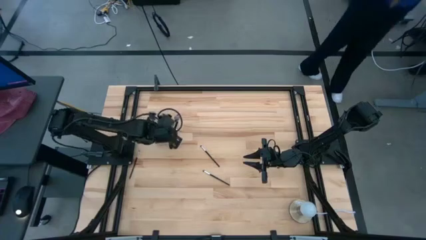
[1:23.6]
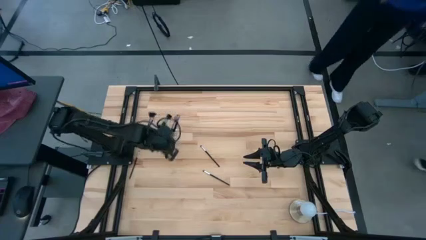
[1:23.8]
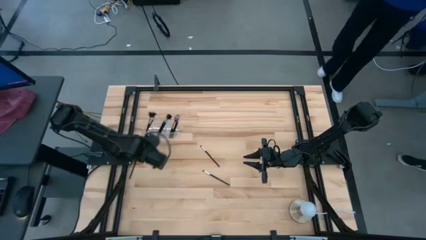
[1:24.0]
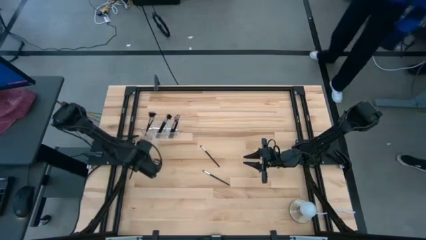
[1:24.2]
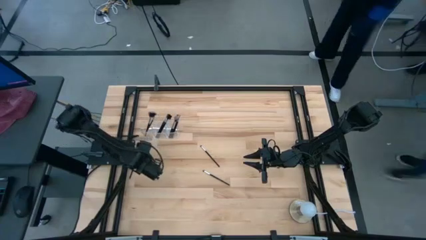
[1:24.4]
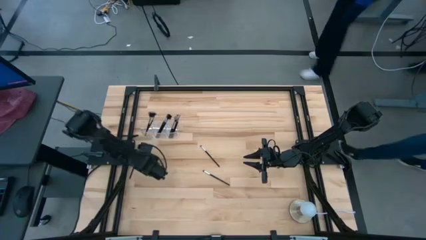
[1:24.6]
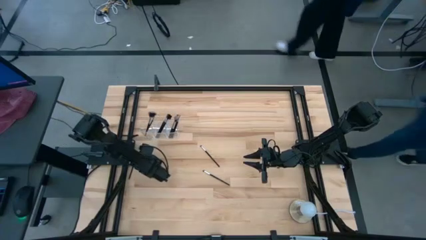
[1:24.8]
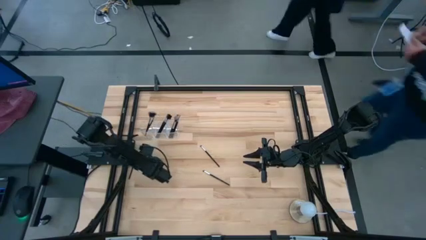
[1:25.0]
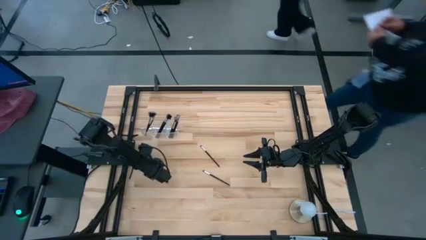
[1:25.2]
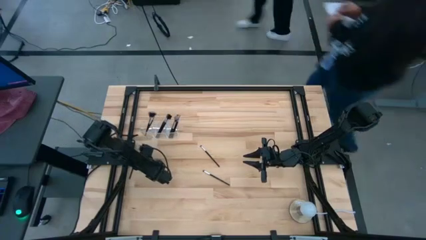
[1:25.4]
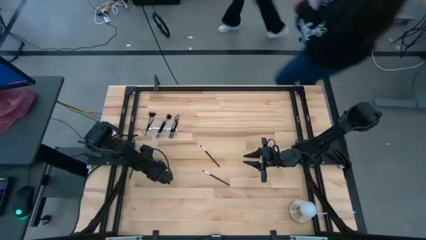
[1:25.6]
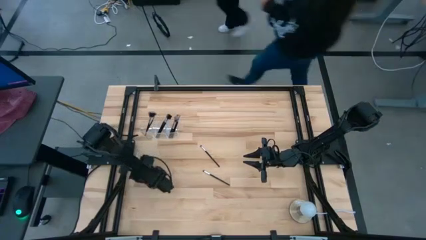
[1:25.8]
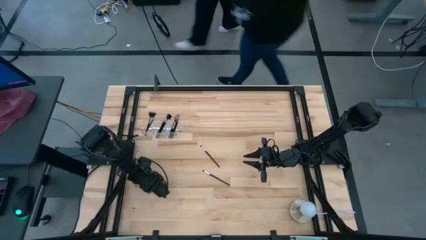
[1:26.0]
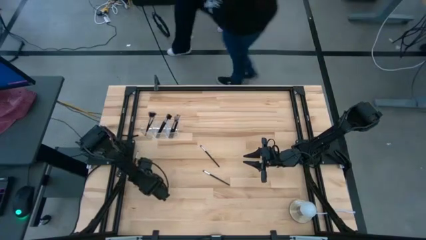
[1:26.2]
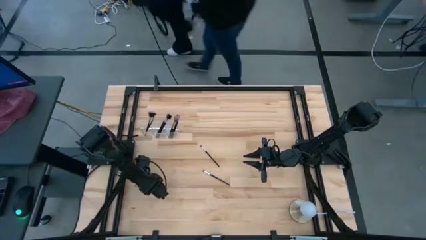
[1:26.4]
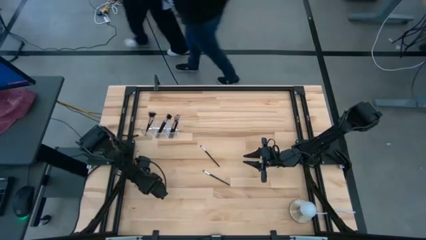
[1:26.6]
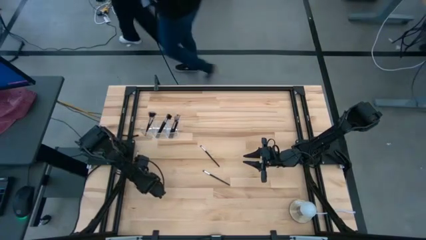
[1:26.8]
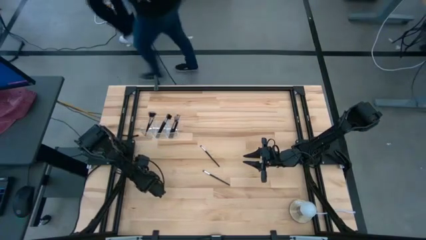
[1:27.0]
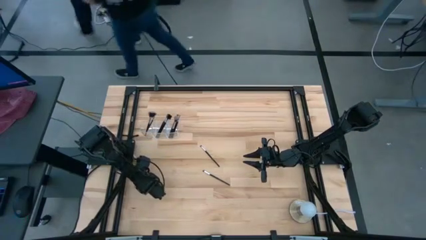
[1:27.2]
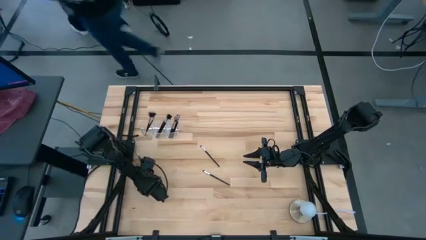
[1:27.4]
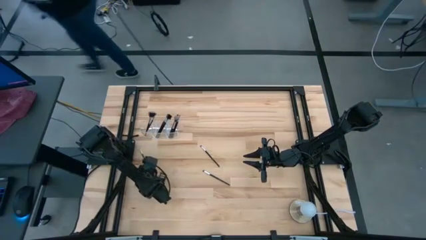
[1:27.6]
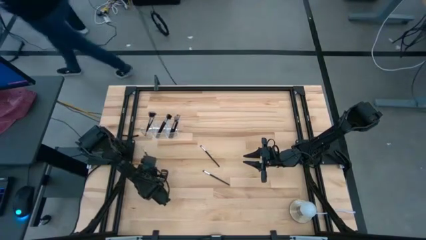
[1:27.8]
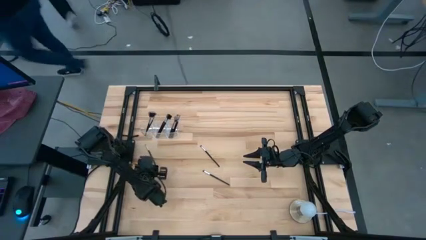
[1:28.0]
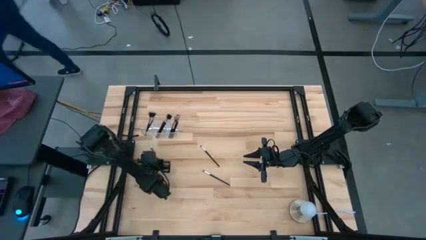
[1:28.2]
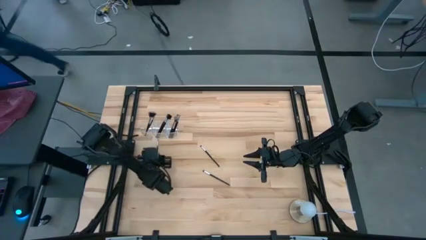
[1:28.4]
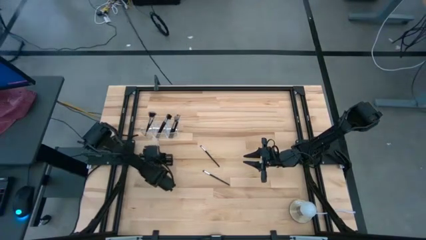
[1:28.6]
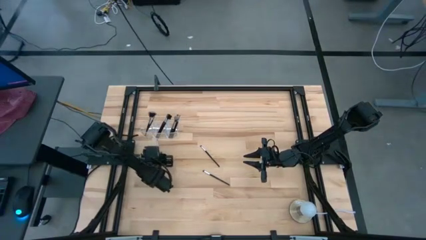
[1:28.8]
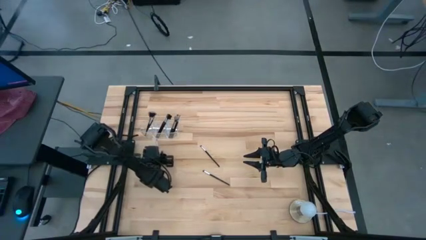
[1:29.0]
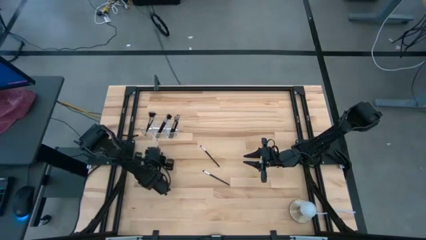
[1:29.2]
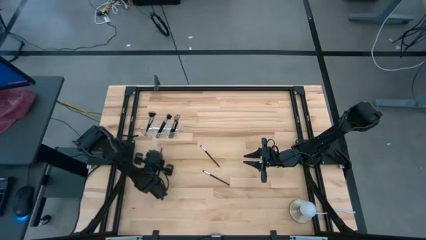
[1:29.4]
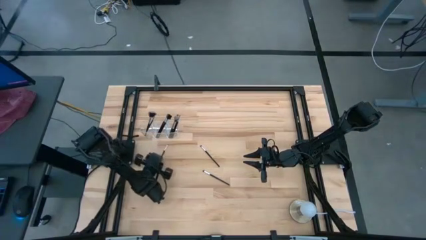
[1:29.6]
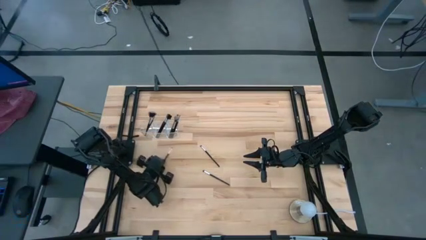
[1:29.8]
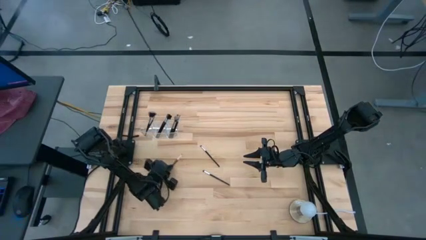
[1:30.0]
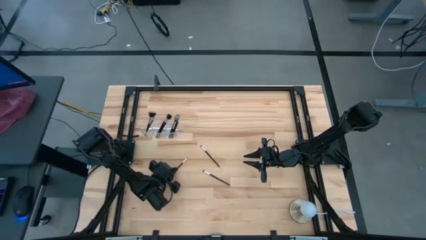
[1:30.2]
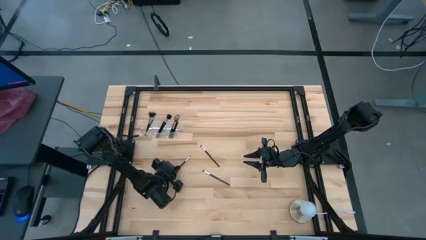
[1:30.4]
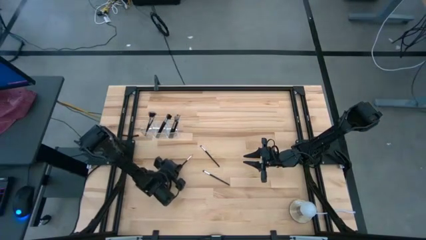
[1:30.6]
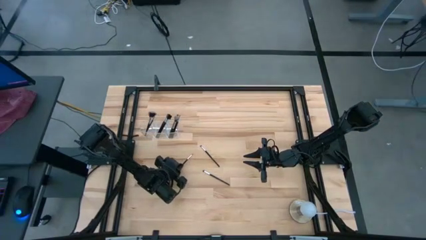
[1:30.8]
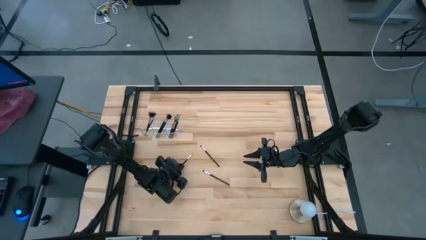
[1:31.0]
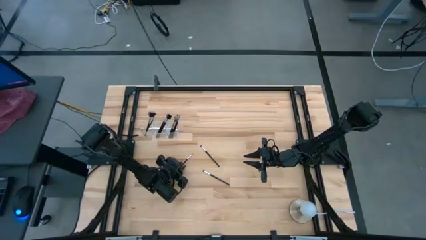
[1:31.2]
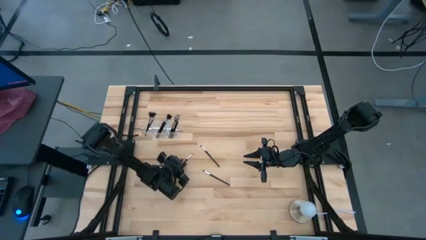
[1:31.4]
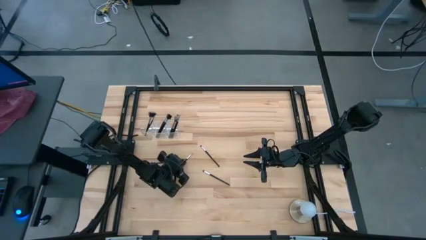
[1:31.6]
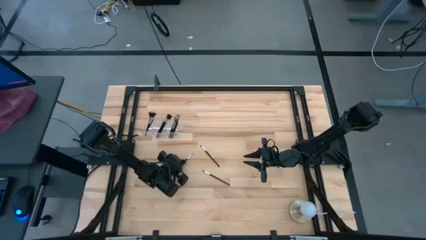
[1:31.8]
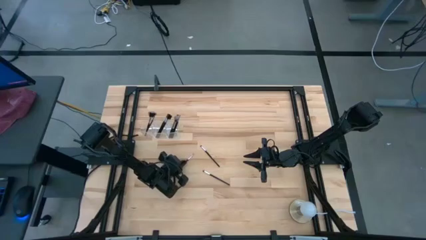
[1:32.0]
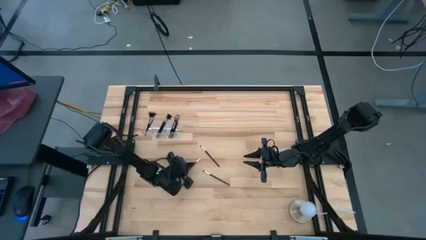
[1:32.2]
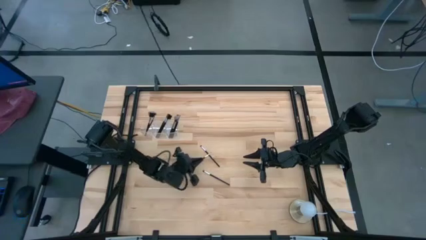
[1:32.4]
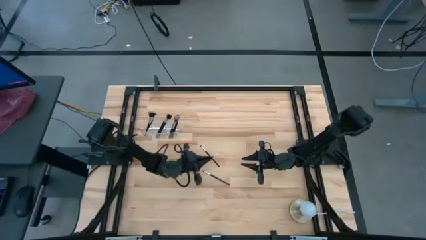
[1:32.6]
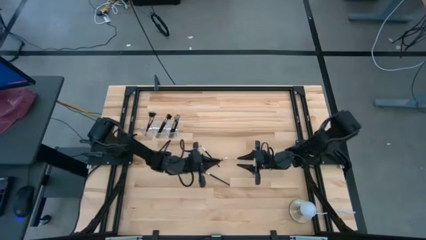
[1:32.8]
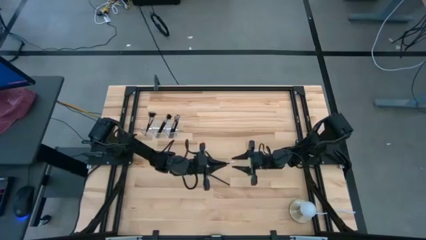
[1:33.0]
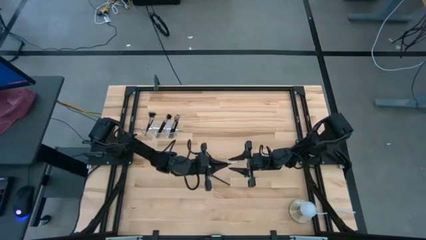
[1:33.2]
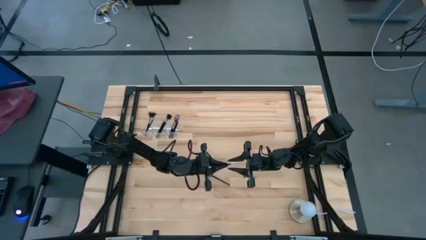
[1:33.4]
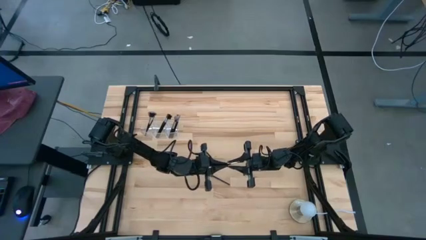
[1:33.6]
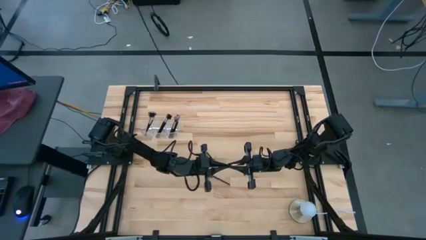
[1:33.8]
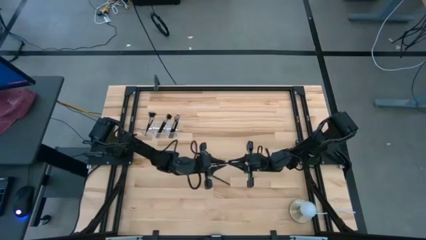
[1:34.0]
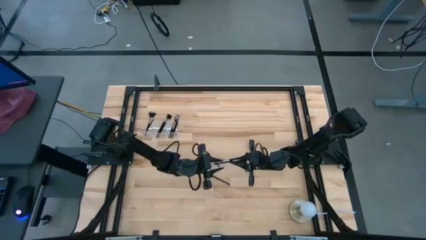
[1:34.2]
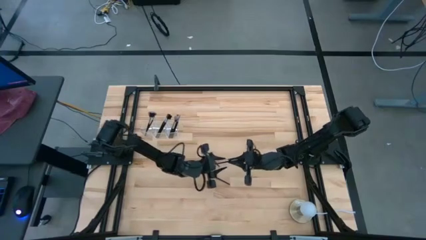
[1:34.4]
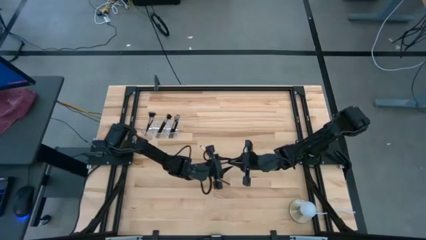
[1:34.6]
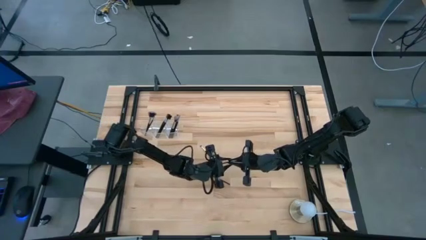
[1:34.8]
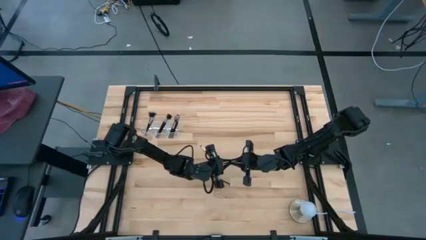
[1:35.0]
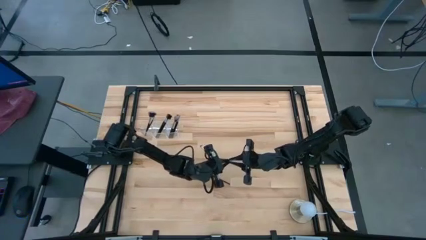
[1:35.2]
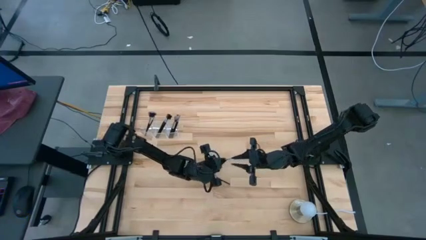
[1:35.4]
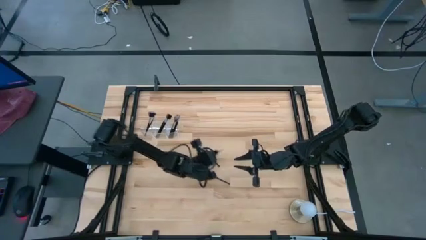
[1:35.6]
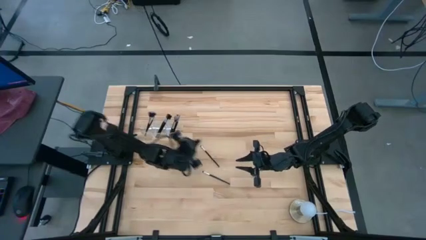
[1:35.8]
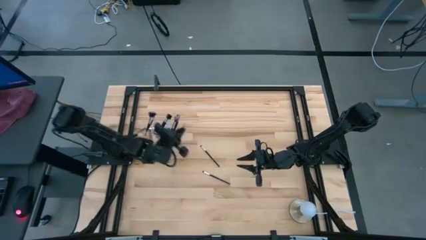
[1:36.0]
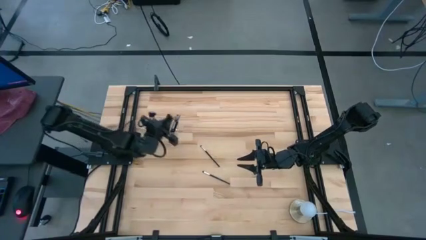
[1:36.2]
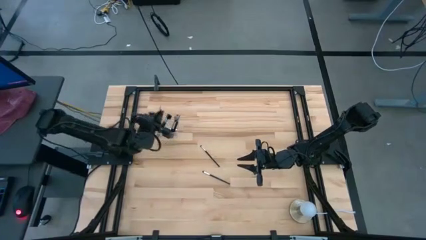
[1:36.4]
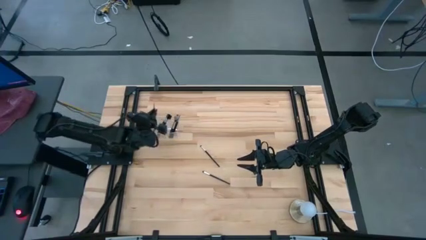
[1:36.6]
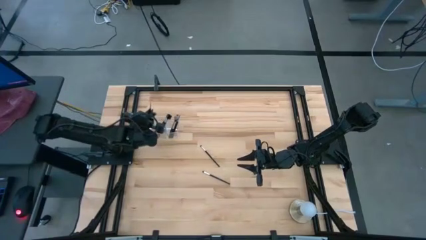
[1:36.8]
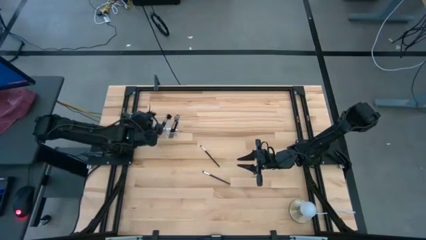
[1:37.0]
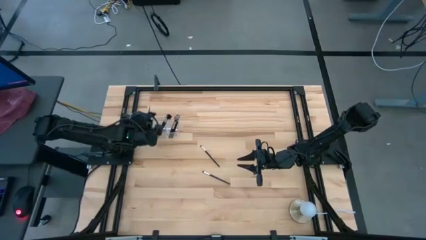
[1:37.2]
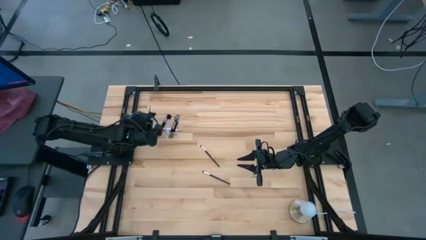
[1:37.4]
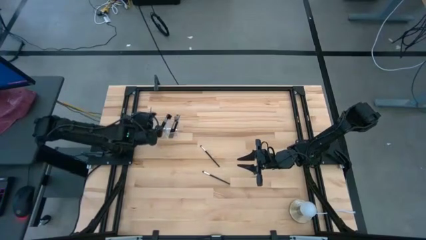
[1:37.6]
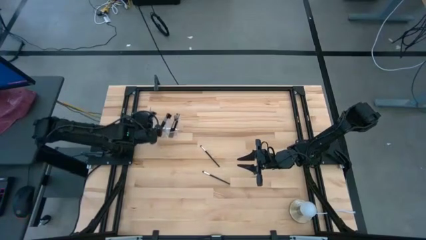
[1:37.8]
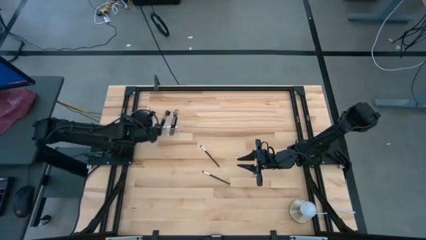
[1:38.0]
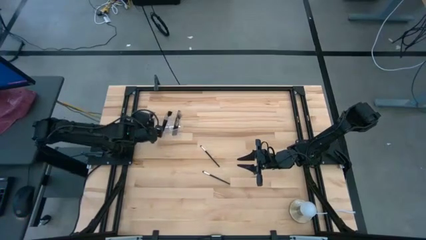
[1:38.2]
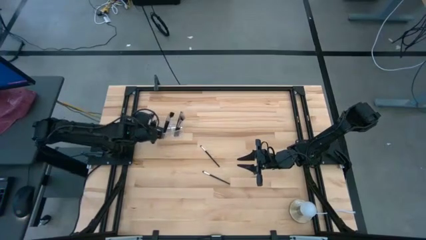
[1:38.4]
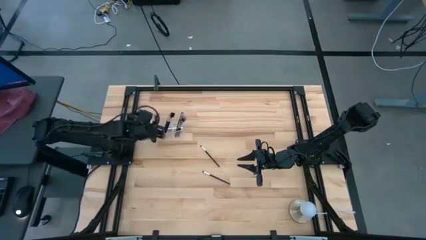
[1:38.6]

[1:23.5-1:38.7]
Task: Put items in baskets/containers
Put the eyeshadow brush into the transparent organizer
